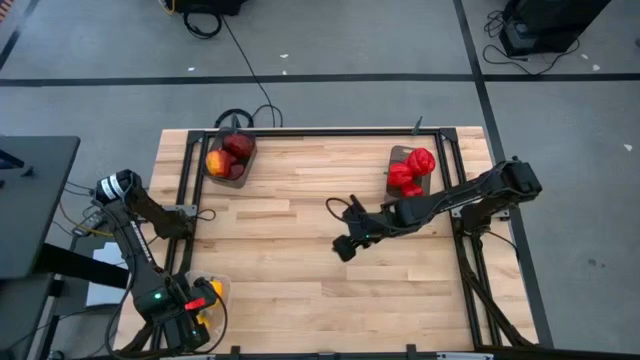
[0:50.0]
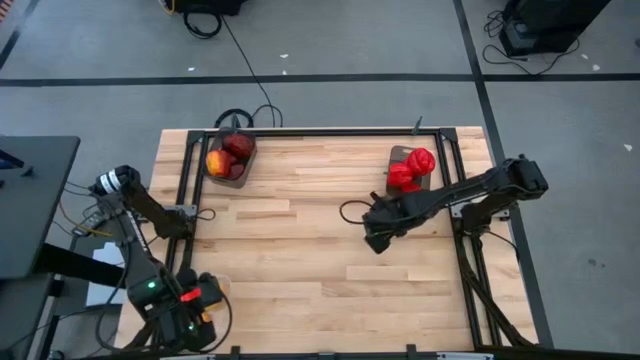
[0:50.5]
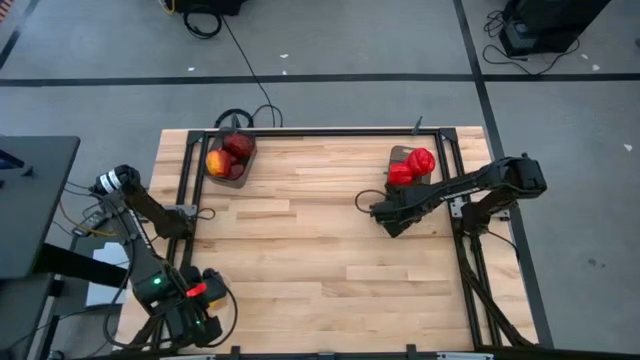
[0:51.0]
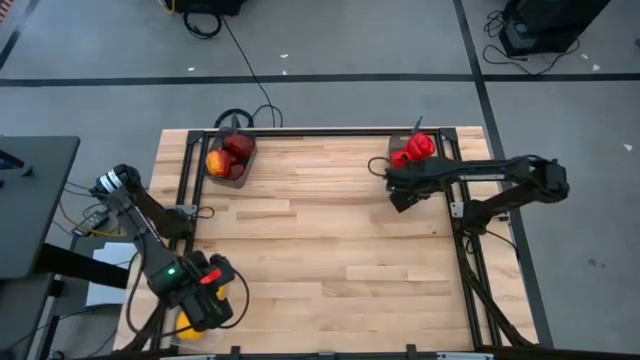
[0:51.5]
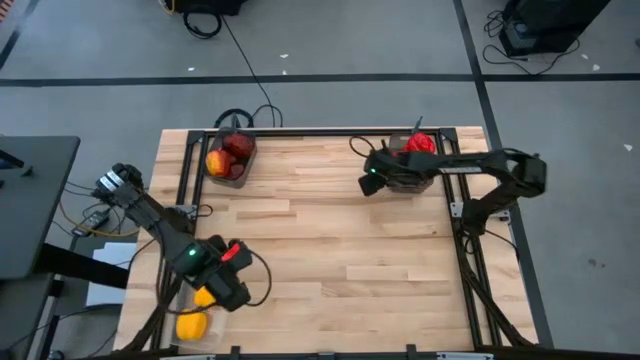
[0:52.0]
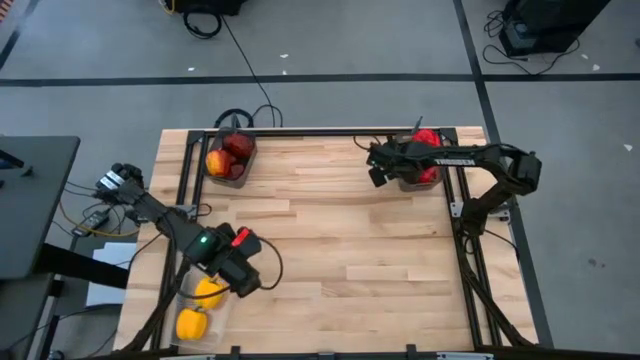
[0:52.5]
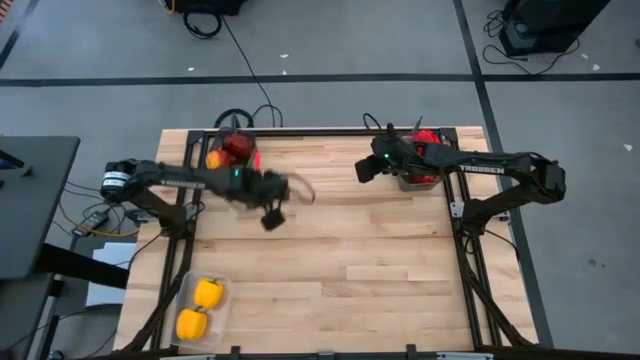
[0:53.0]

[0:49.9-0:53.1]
Task: Sort produce into baskets
Adjust the right black bin

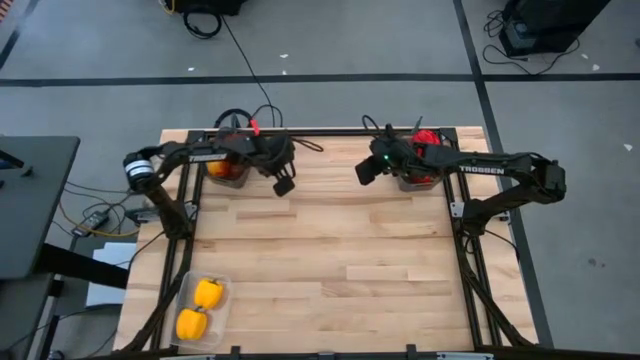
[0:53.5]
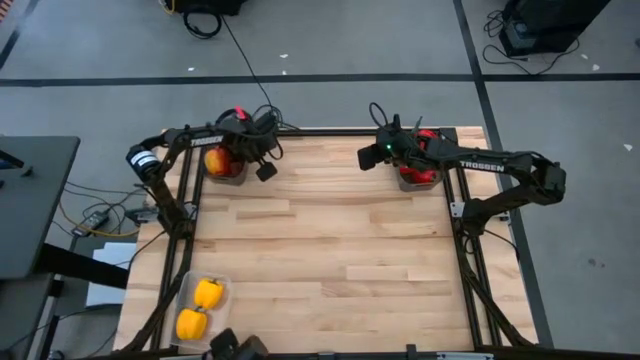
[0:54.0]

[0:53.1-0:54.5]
Adjust the left black bin

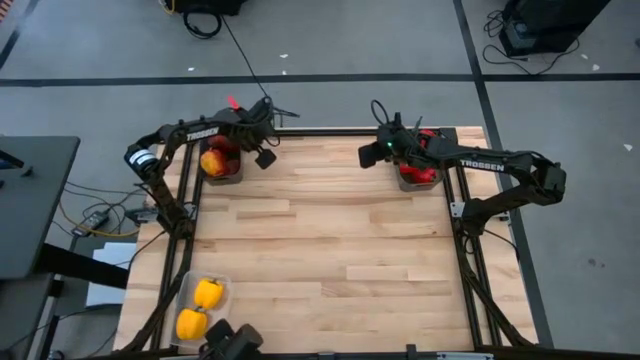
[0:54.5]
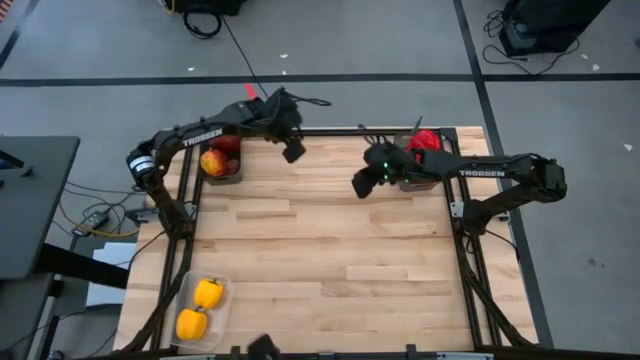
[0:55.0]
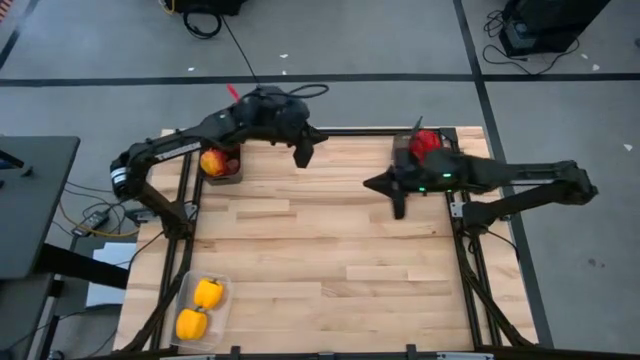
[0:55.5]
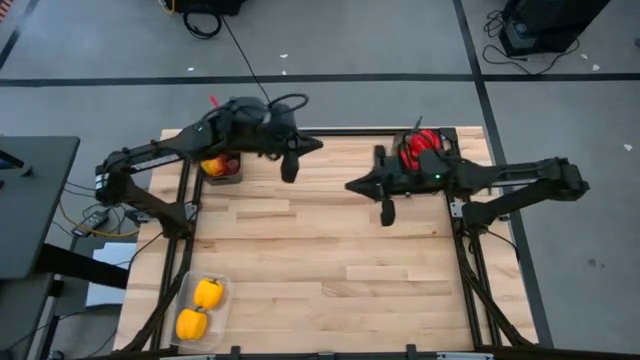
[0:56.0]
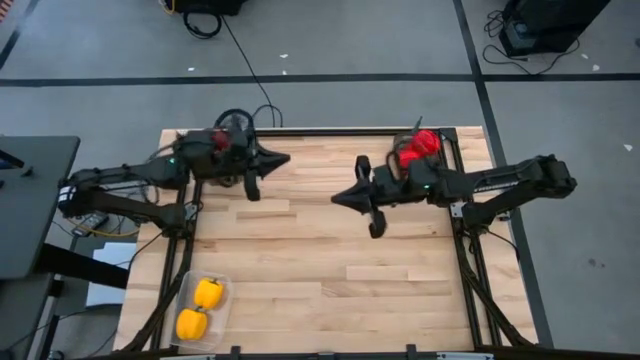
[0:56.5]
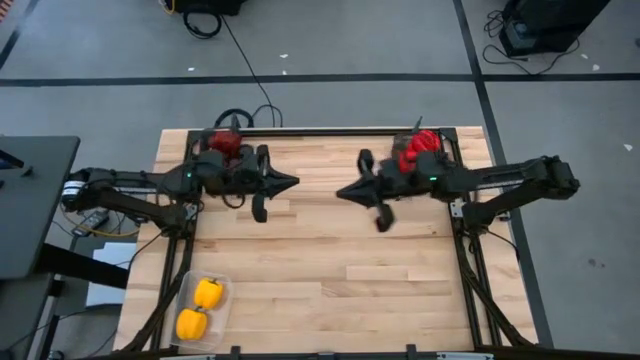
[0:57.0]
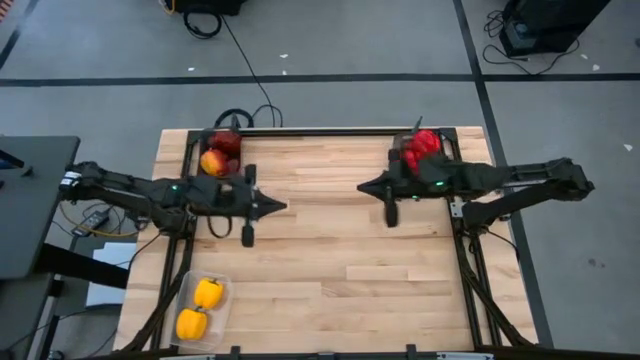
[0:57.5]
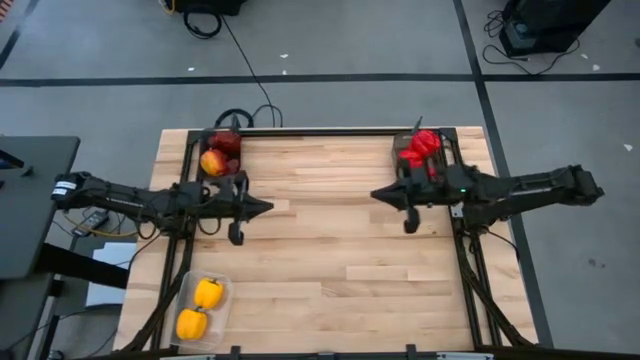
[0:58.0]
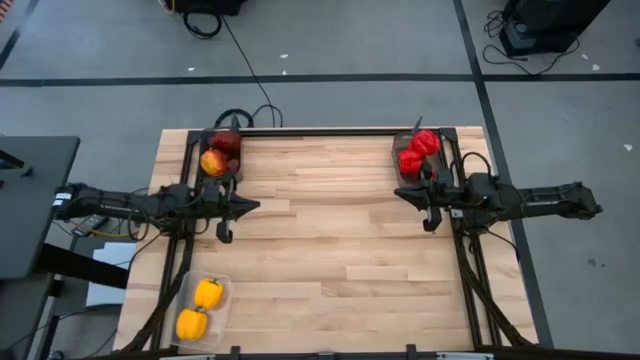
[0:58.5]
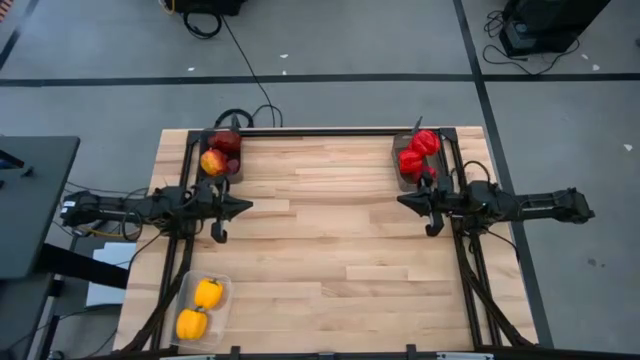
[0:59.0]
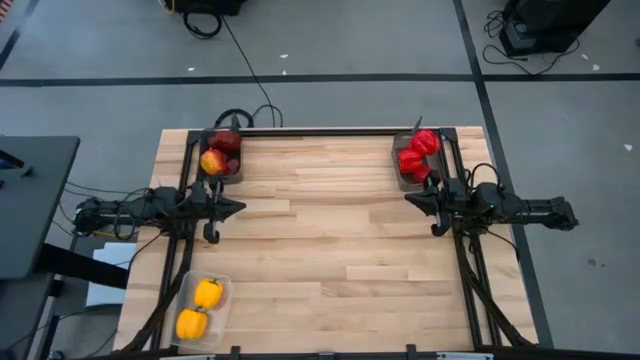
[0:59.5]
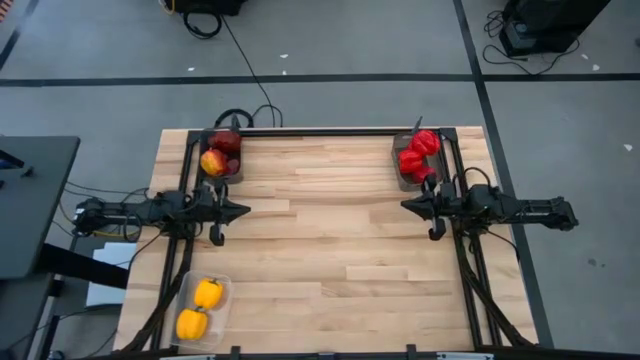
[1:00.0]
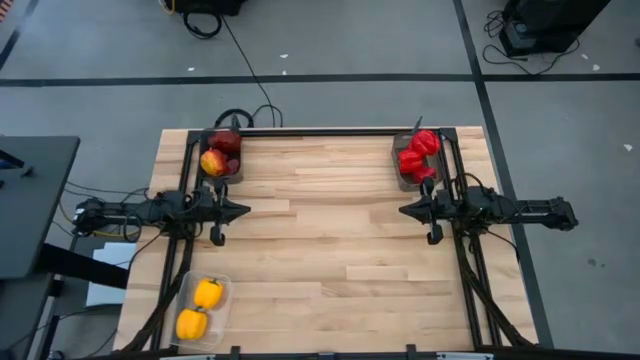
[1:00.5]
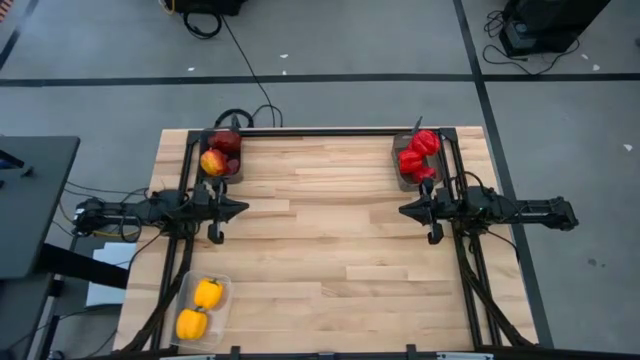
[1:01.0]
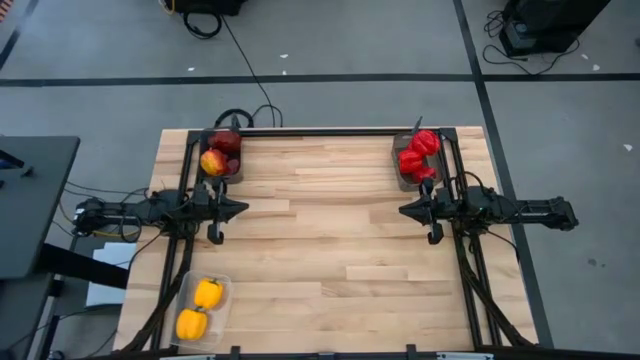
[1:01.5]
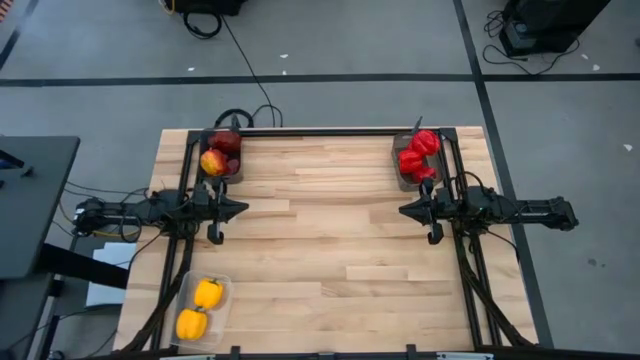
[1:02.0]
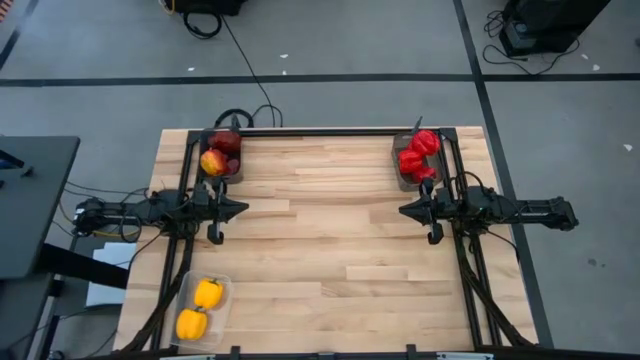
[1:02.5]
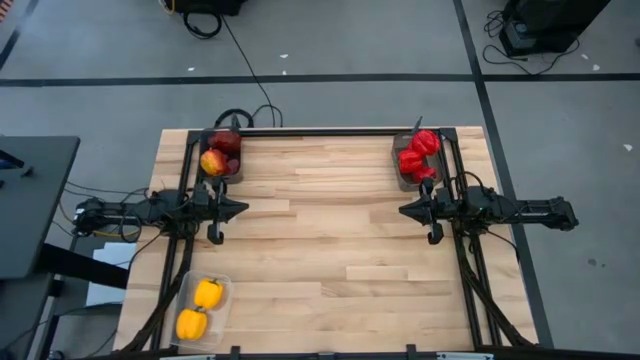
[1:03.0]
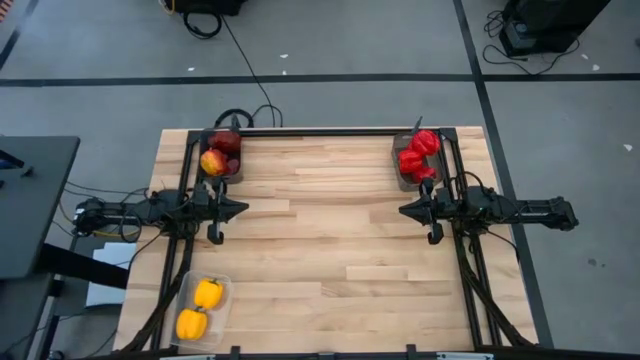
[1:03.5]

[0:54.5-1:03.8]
Return to Home Position

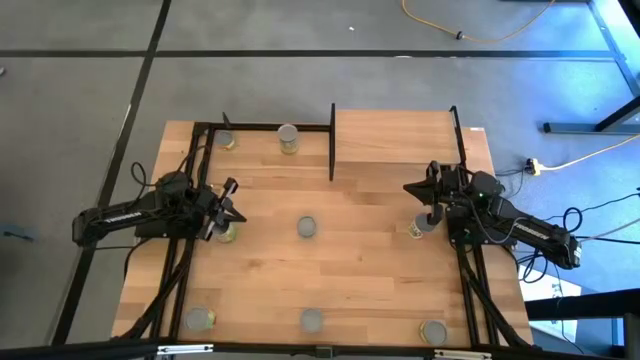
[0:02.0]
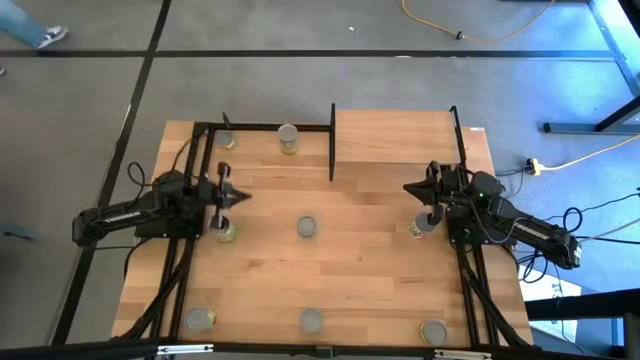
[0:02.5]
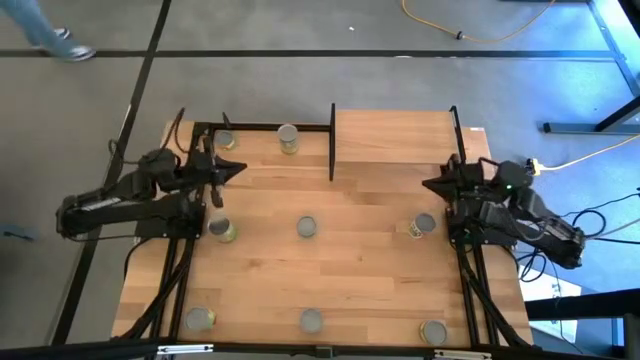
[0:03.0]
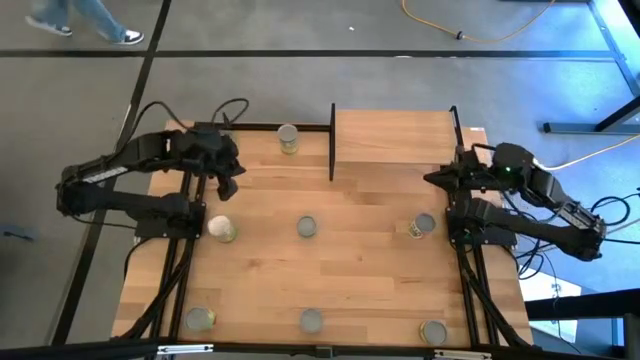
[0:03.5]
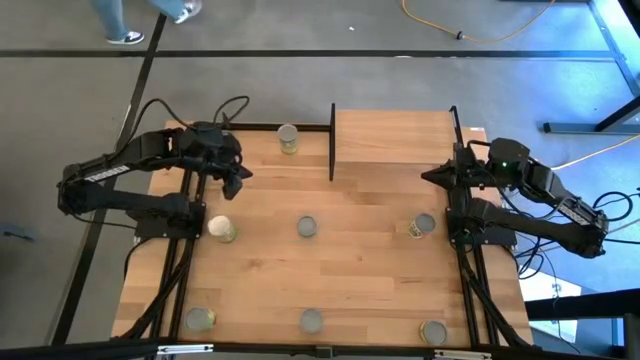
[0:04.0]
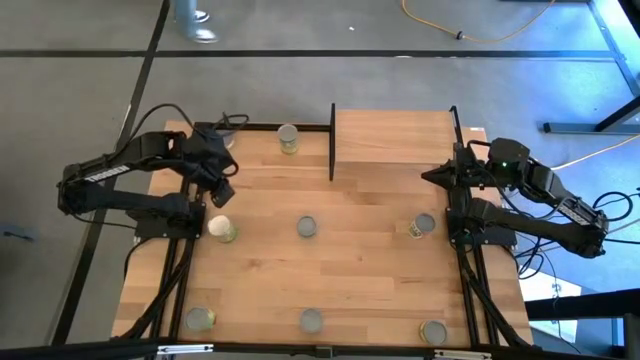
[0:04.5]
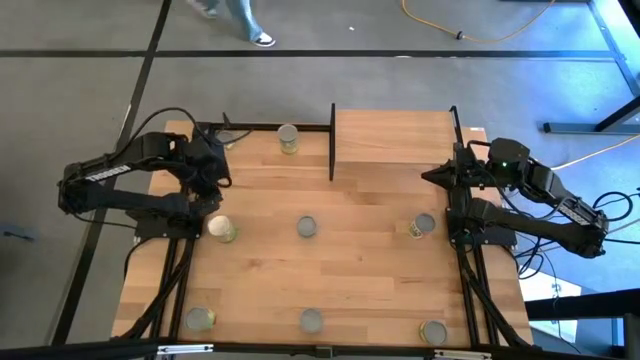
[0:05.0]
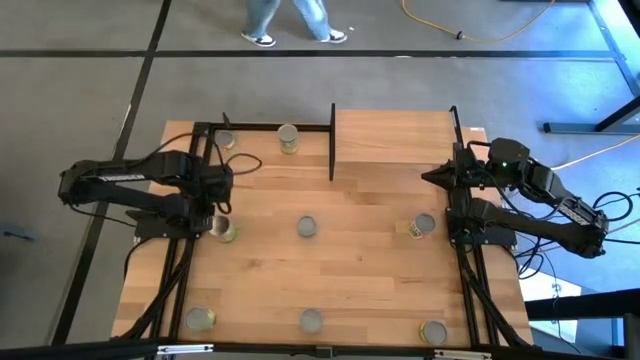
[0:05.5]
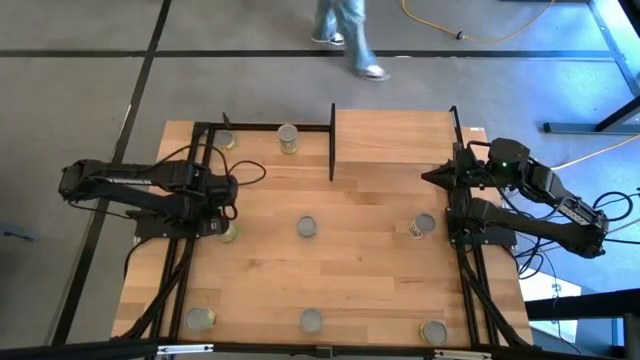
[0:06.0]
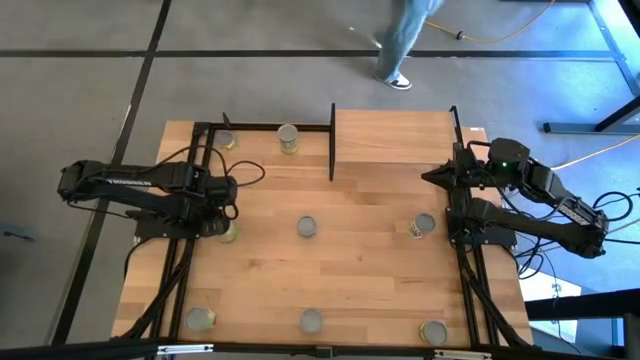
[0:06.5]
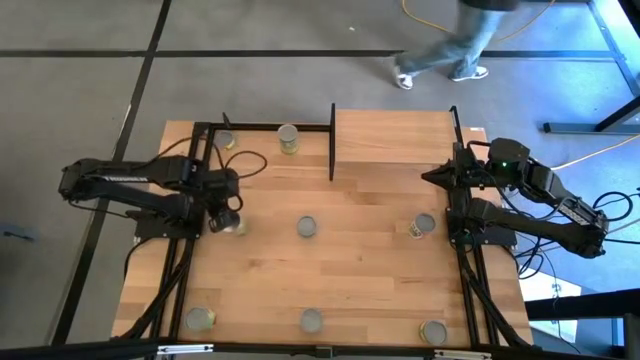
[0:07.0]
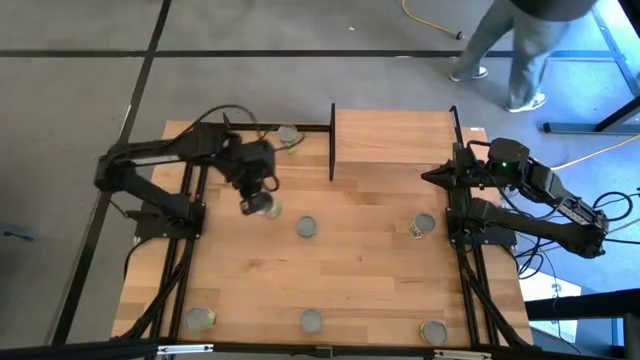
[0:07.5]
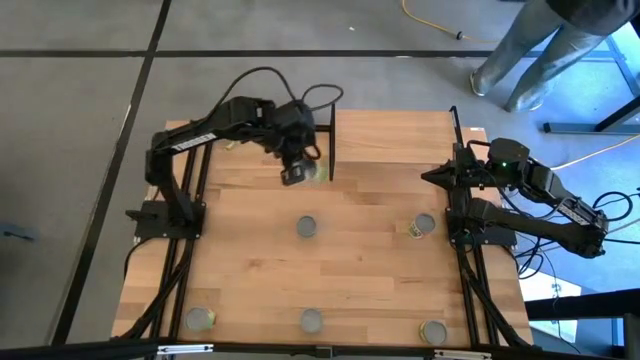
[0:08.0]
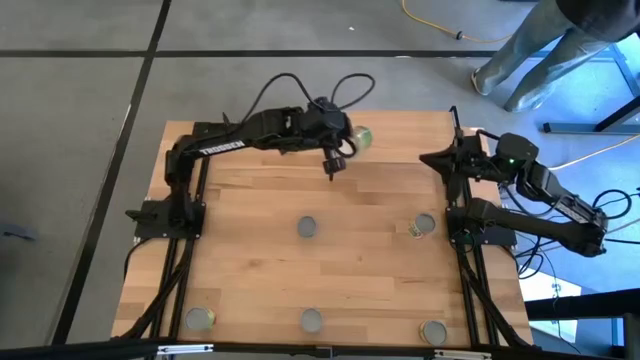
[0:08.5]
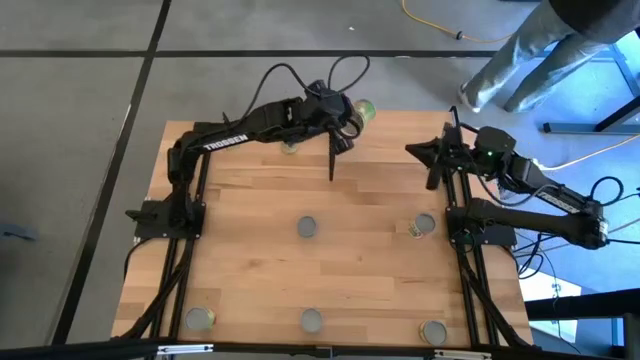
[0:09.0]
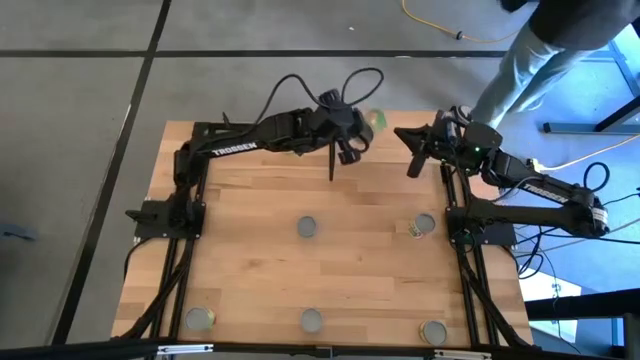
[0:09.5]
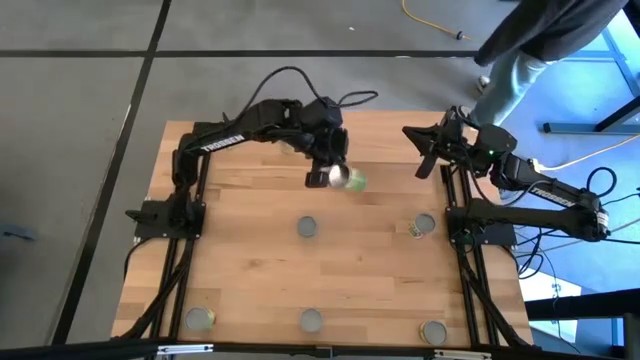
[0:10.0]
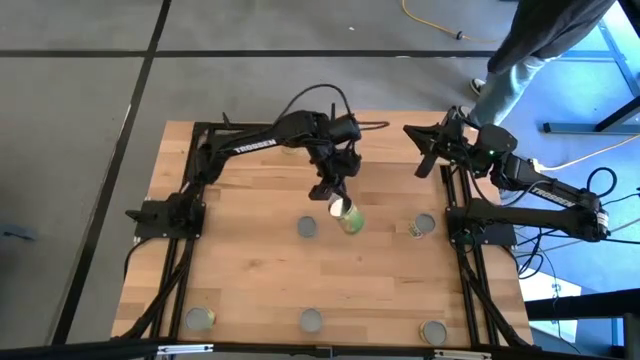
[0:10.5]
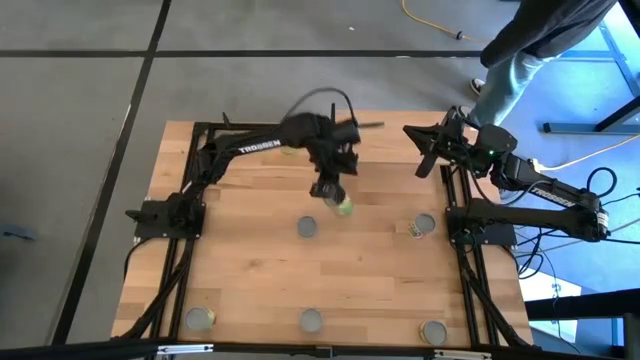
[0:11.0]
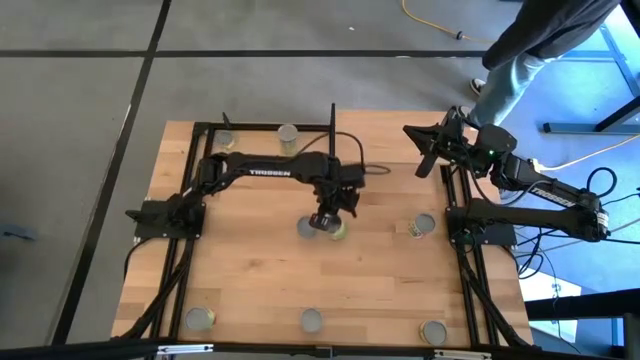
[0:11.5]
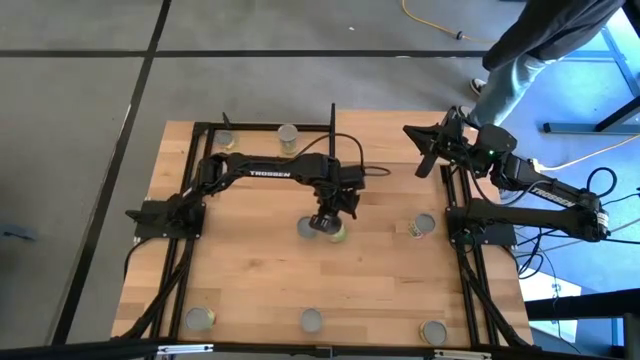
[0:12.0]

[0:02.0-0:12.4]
Task: Pick and place cans onto a shelf
Move the green can to the middle of the table
